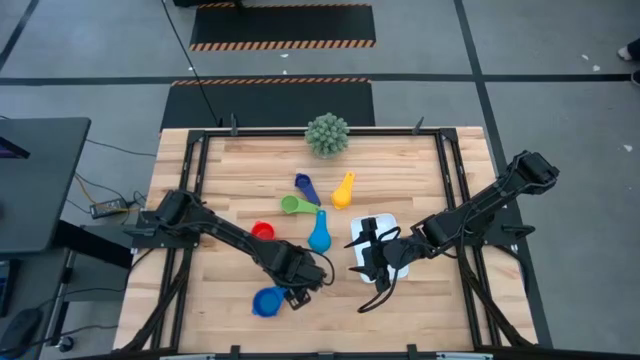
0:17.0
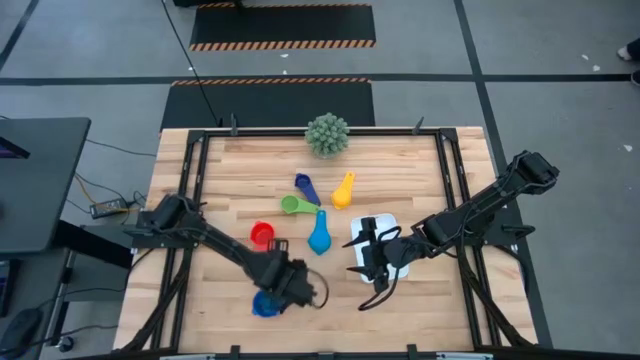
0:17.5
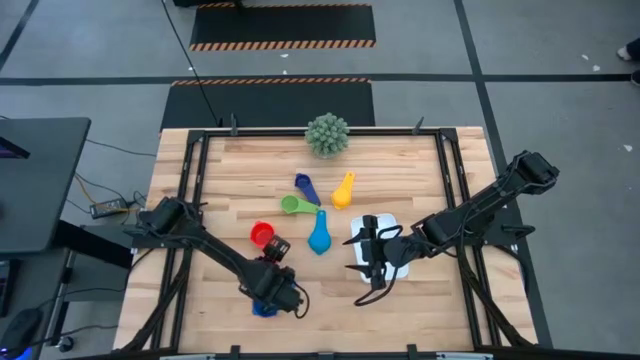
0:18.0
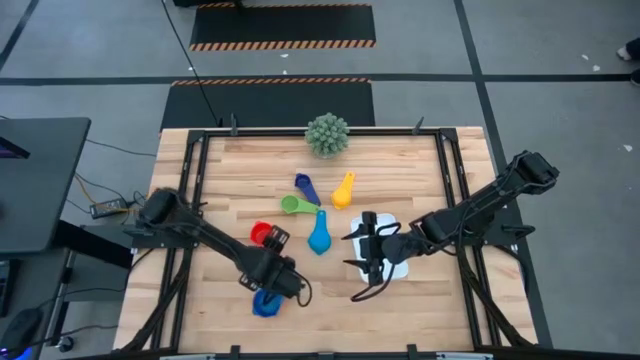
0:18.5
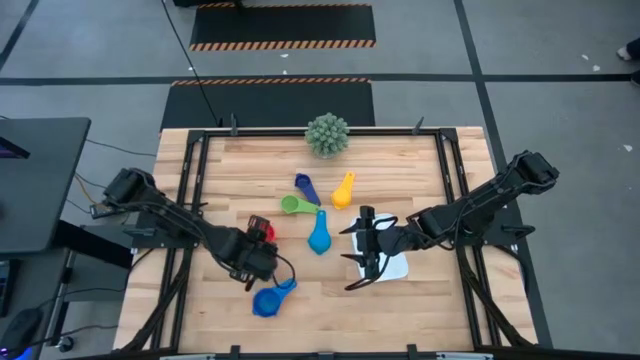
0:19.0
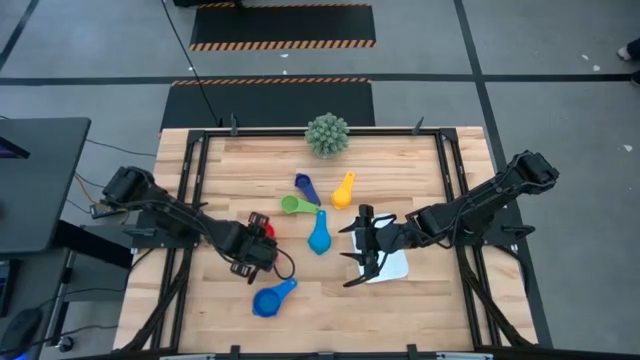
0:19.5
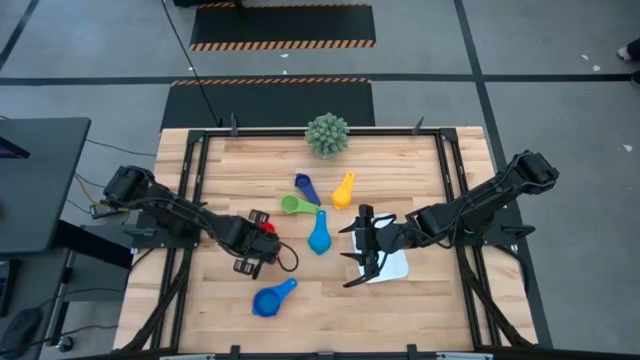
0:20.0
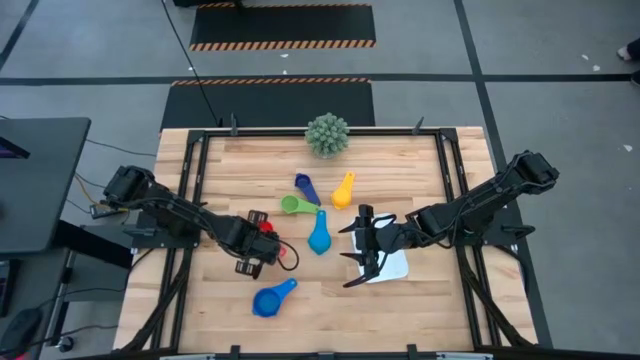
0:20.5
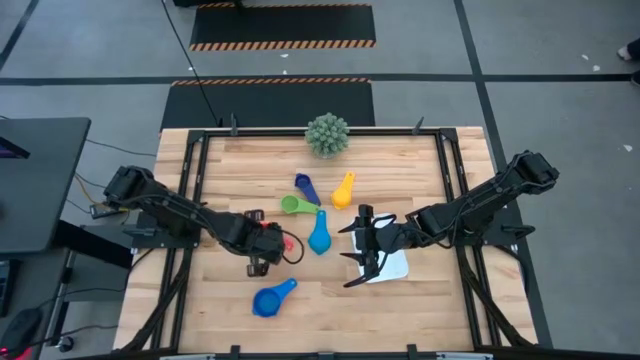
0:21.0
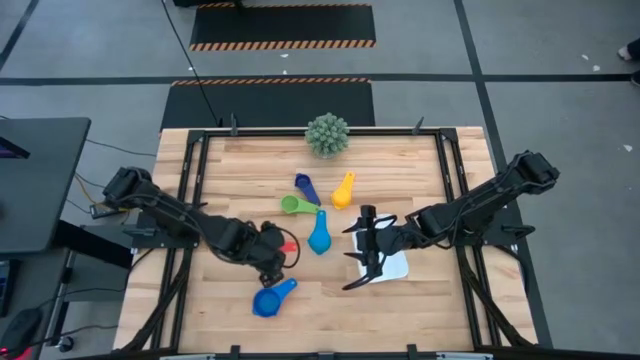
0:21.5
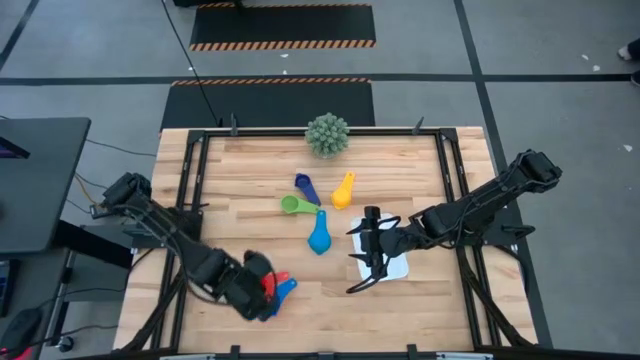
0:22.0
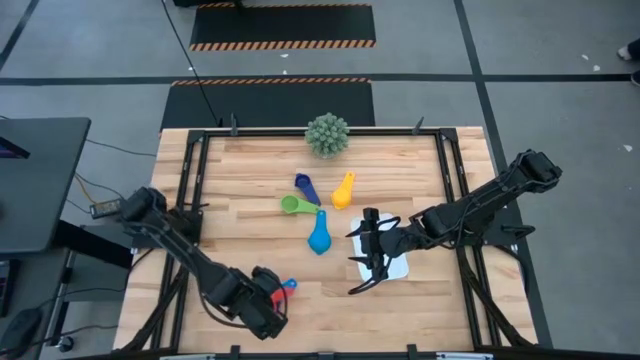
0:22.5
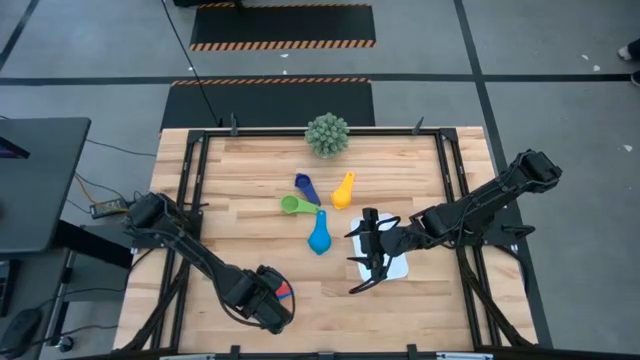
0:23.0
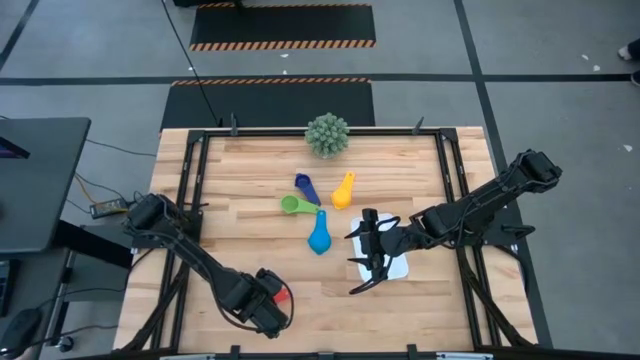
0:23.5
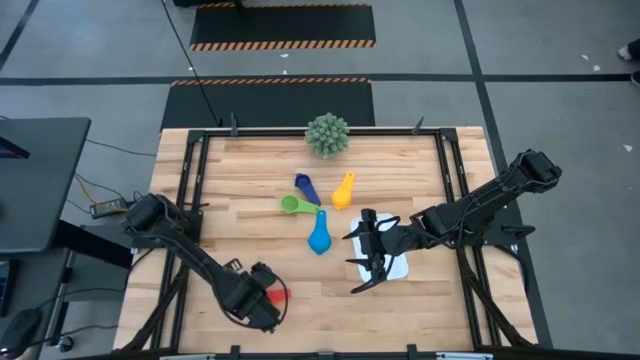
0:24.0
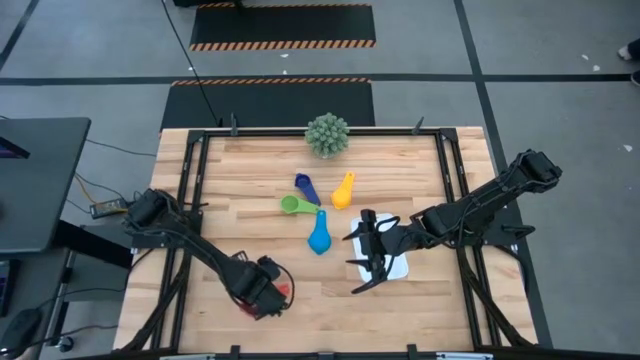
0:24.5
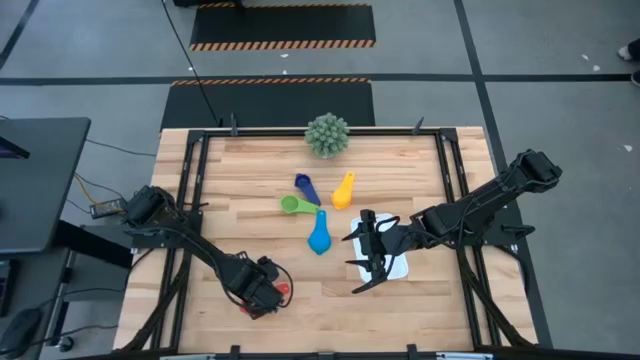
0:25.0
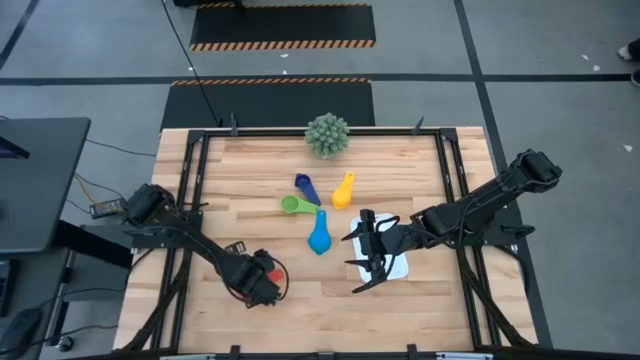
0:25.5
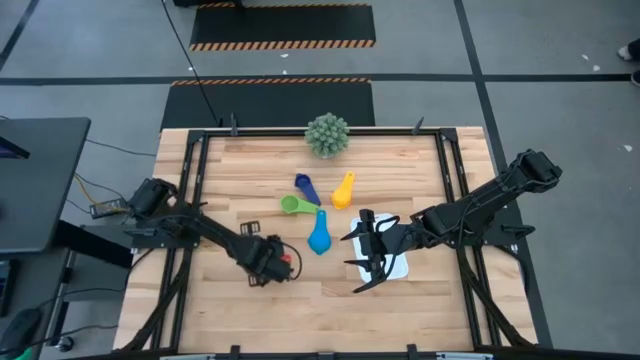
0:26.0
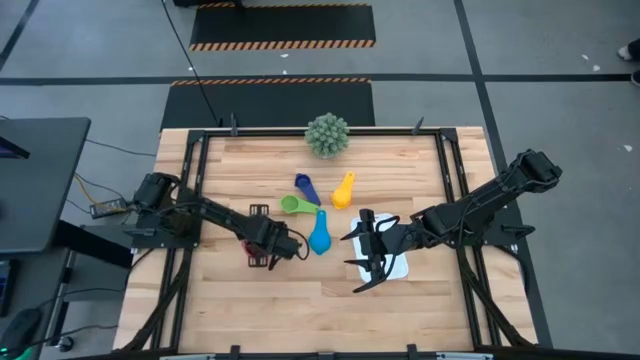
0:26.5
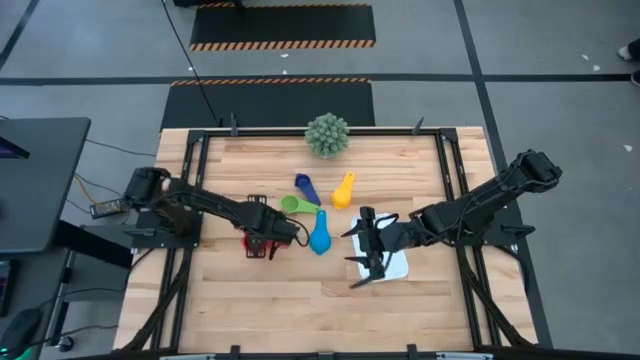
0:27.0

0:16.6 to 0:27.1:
Task: Nest measuring cups in basket
Stack the red measuring cup into the blue measuring cup

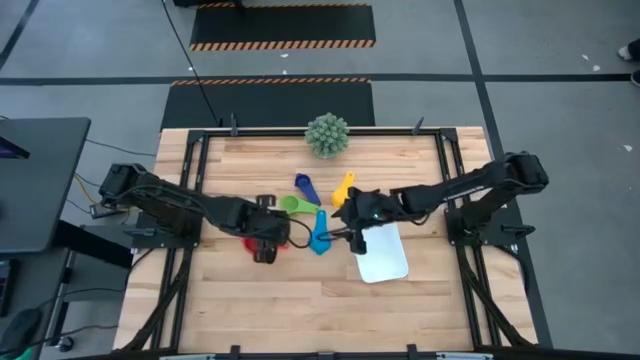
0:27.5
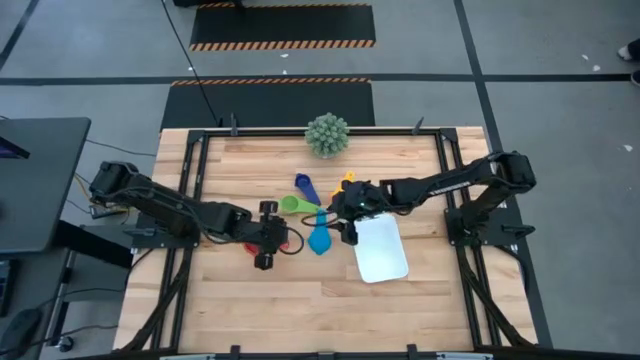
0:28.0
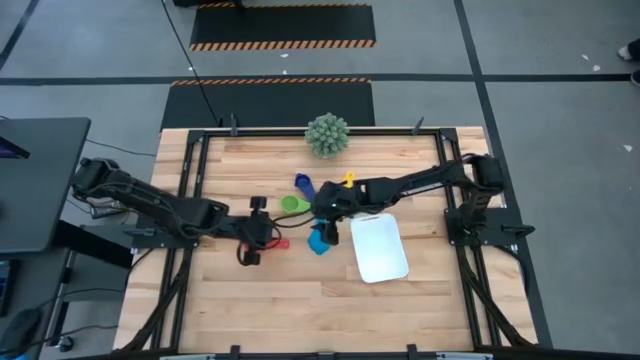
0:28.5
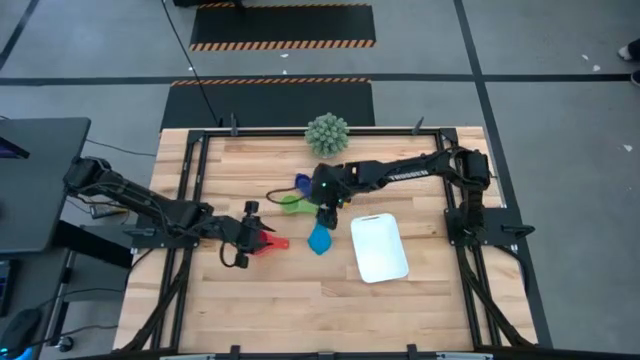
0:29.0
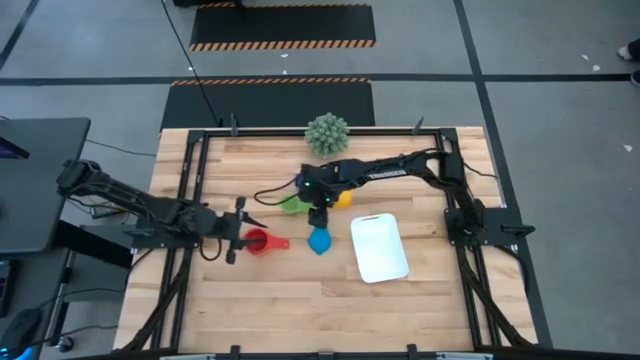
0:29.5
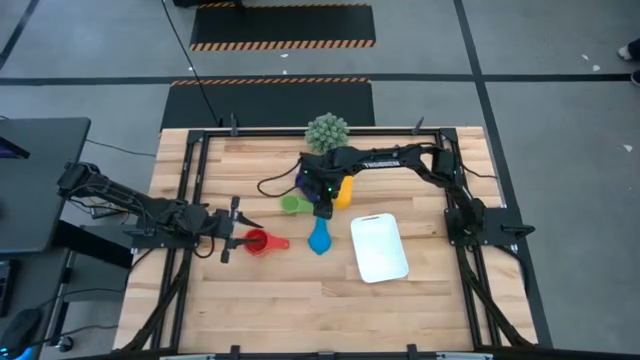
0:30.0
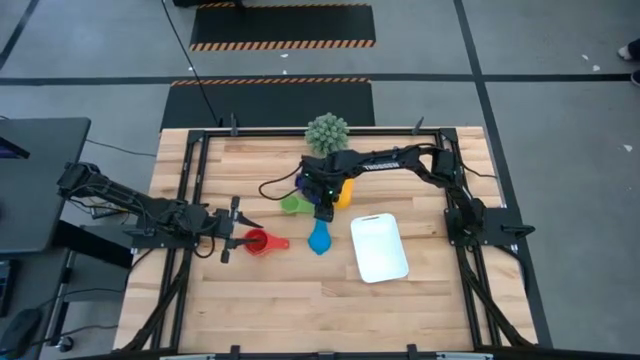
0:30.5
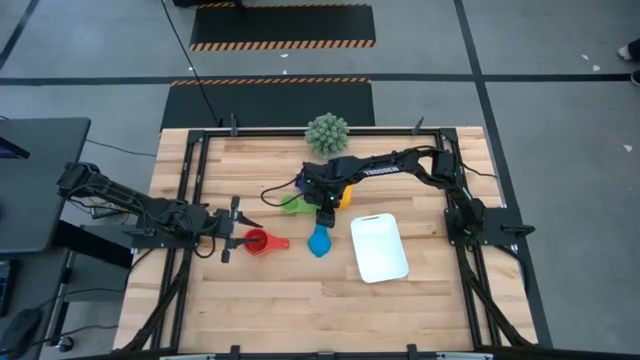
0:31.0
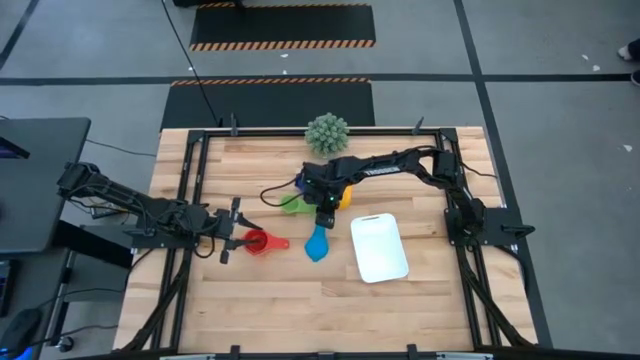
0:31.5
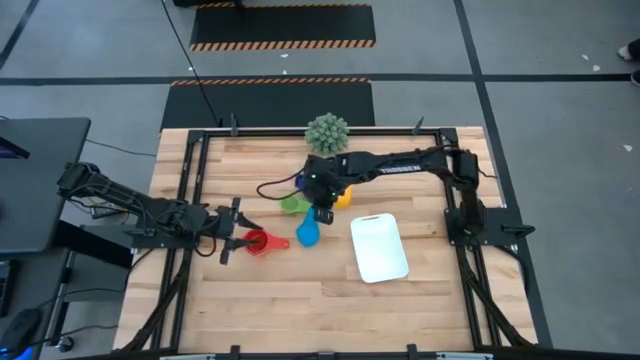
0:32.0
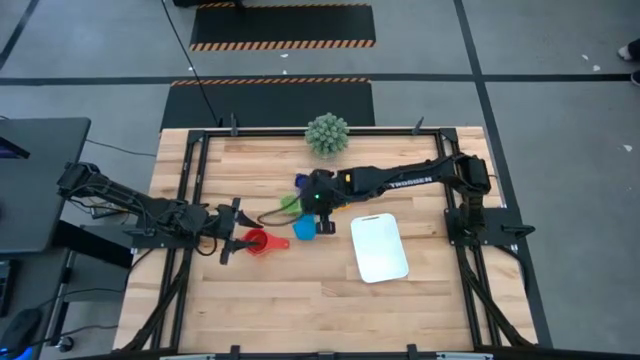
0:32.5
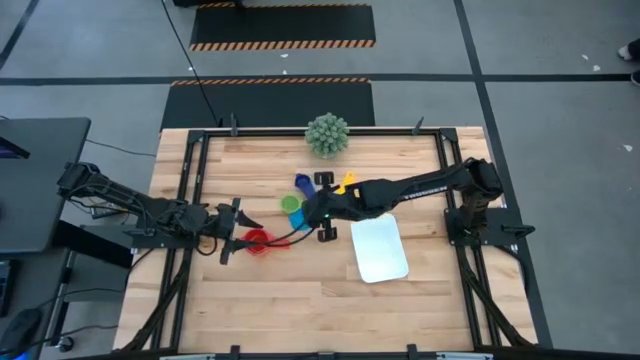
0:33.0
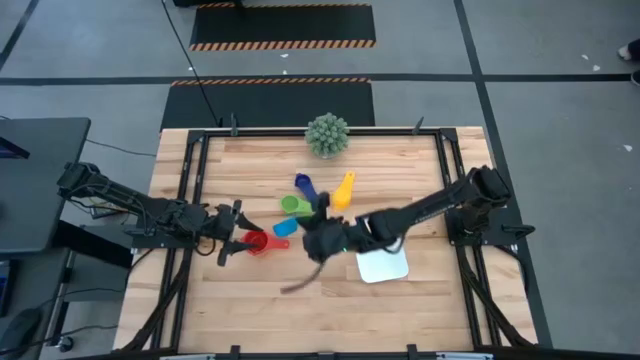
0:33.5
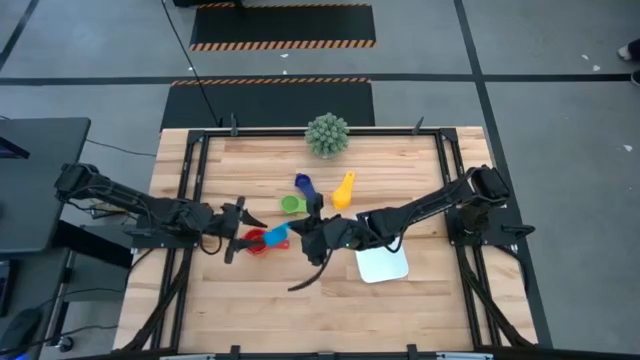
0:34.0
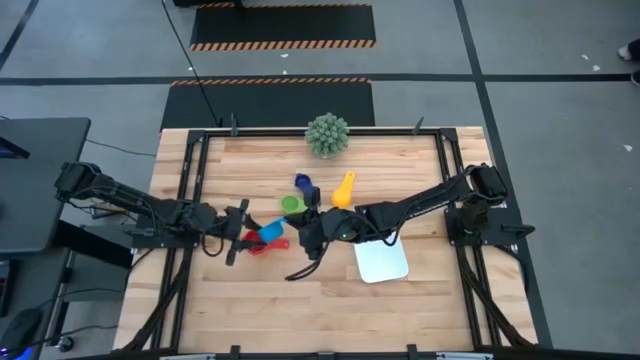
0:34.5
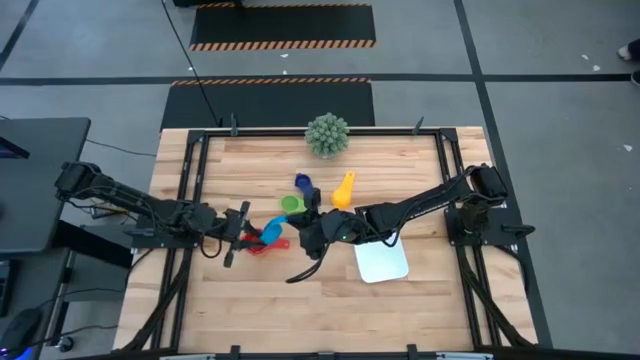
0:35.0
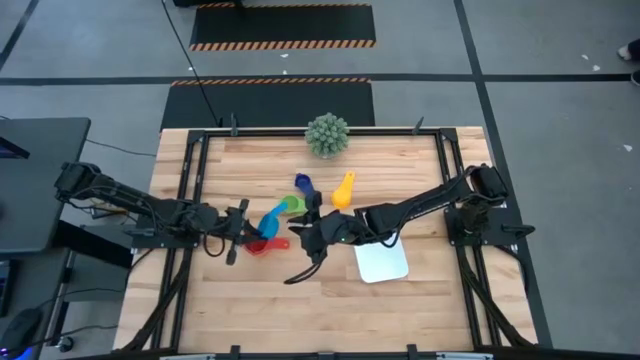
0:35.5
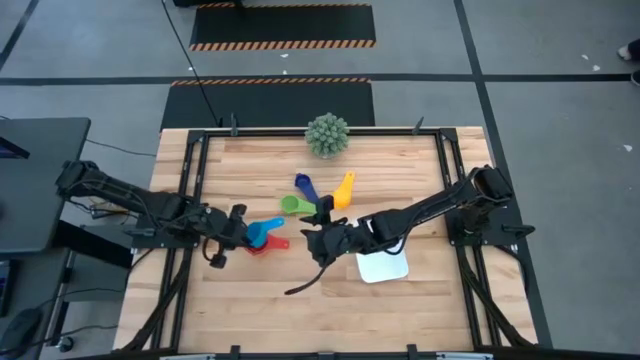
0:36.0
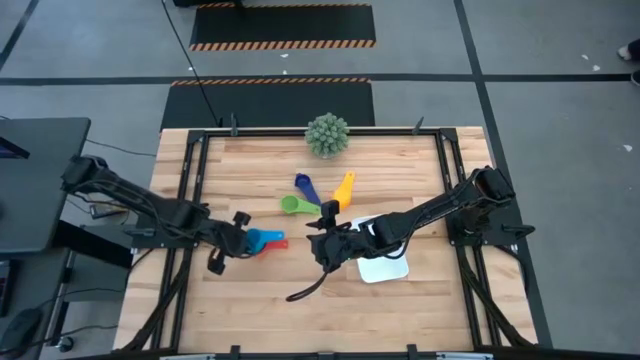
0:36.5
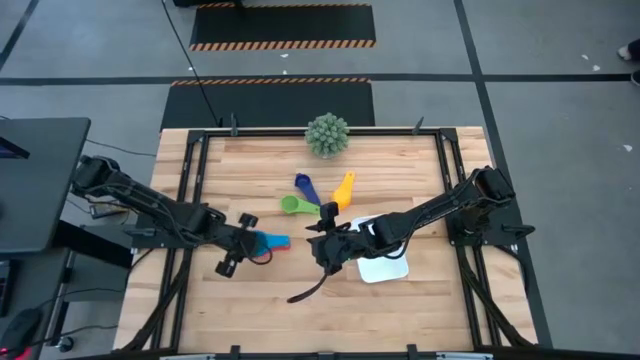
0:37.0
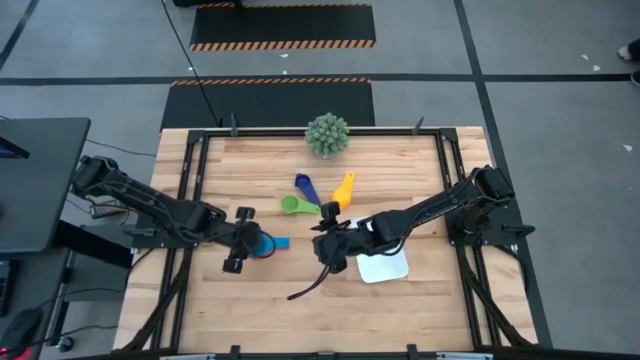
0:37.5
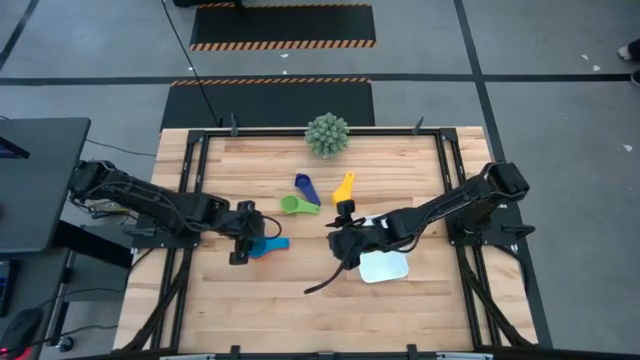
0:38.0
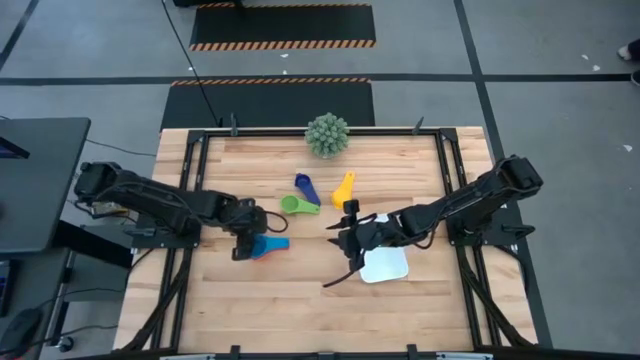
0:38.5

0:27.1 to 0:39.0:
Stack the light blue measuring cup into the red measuring cup
